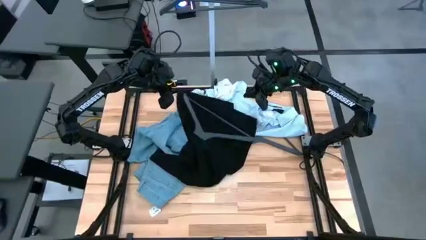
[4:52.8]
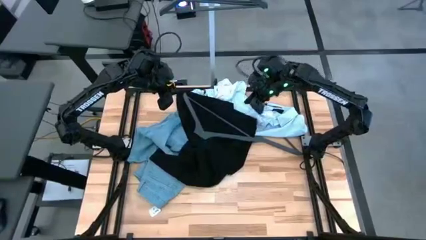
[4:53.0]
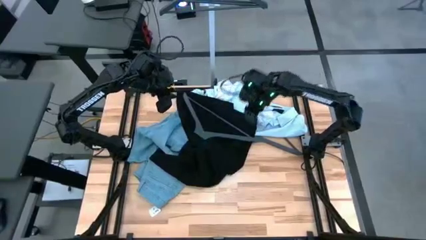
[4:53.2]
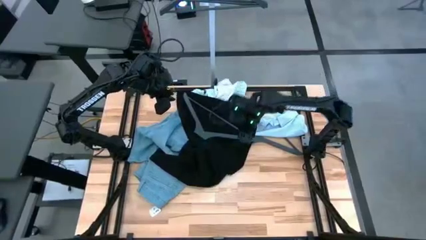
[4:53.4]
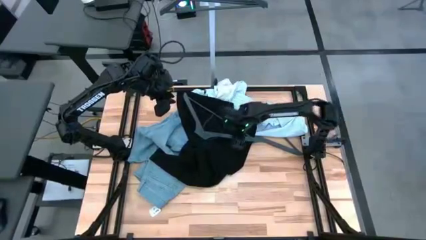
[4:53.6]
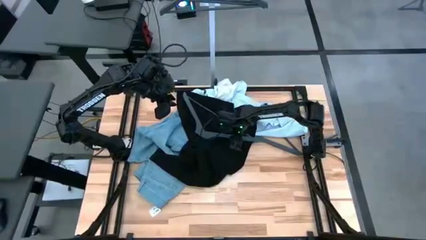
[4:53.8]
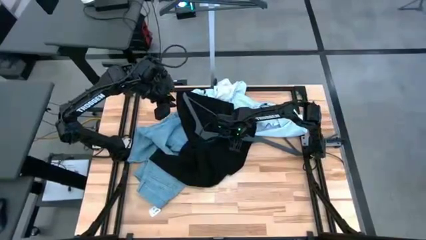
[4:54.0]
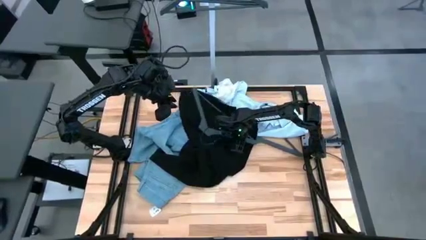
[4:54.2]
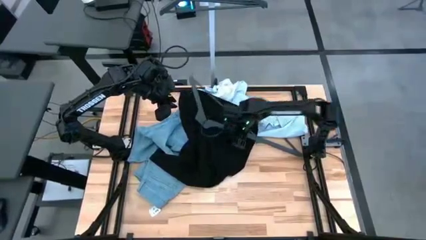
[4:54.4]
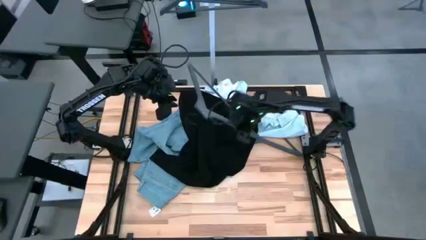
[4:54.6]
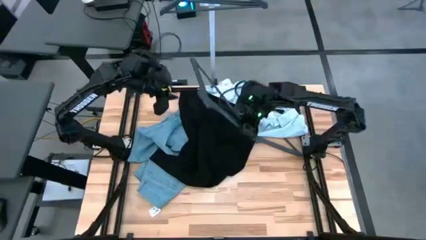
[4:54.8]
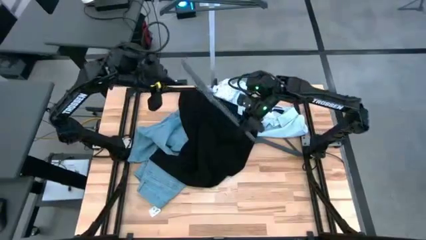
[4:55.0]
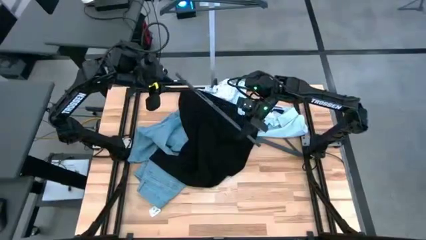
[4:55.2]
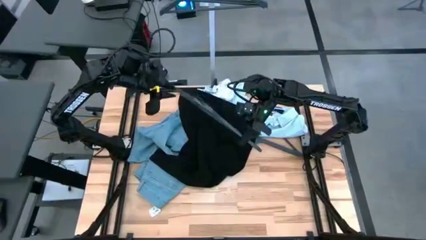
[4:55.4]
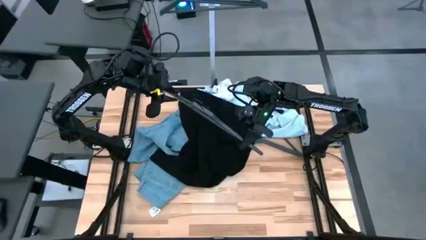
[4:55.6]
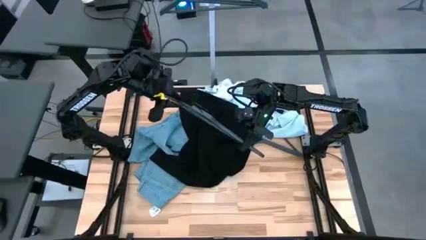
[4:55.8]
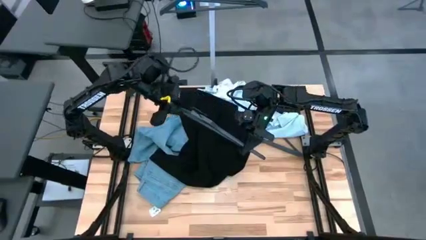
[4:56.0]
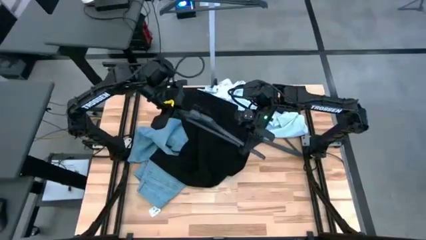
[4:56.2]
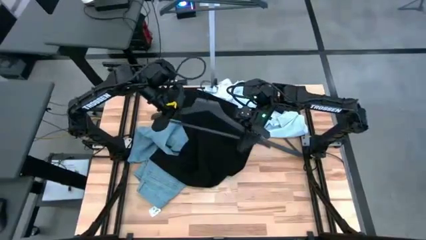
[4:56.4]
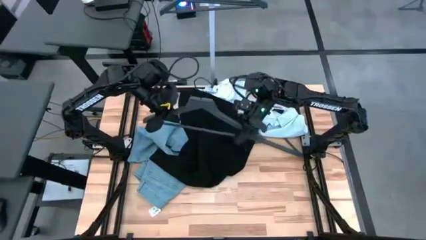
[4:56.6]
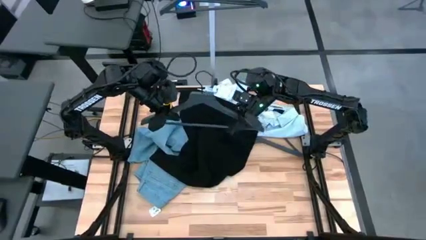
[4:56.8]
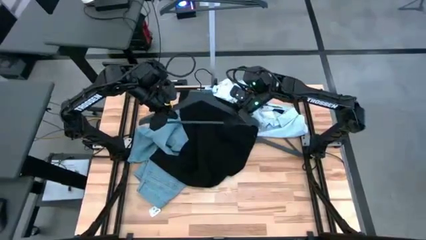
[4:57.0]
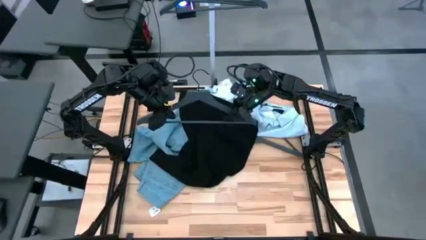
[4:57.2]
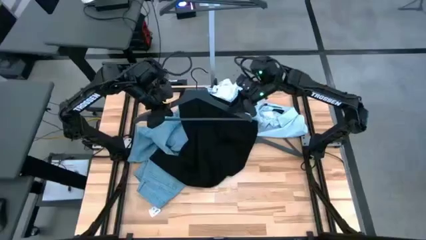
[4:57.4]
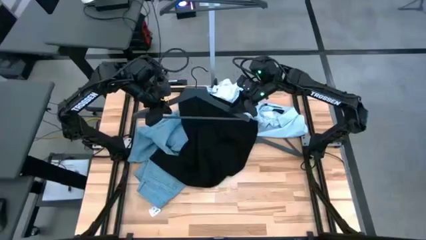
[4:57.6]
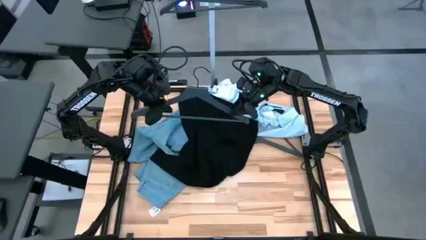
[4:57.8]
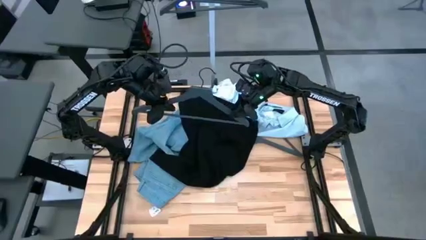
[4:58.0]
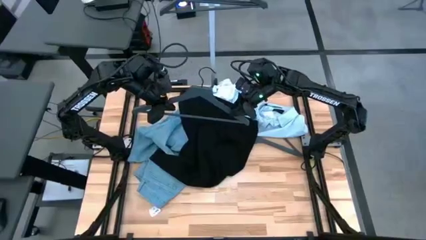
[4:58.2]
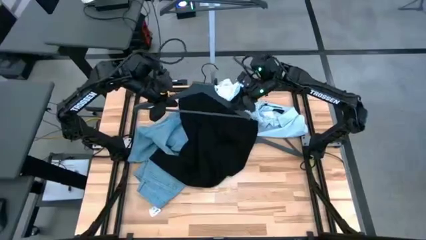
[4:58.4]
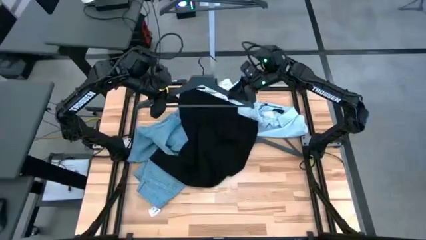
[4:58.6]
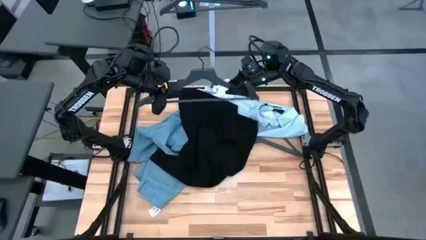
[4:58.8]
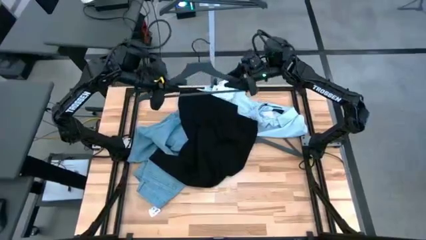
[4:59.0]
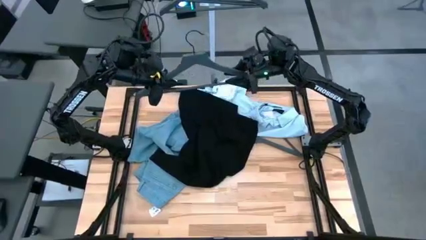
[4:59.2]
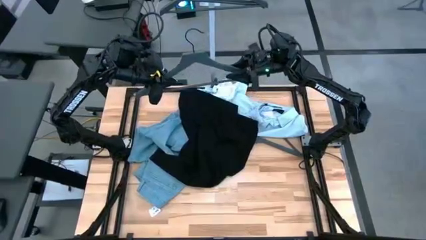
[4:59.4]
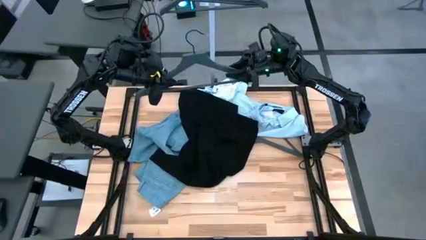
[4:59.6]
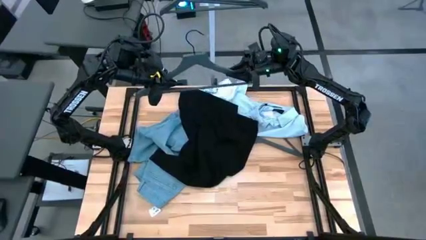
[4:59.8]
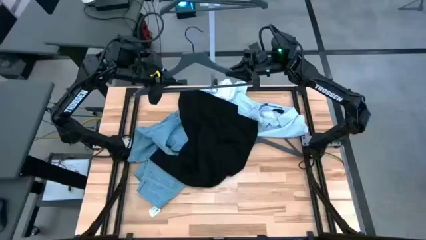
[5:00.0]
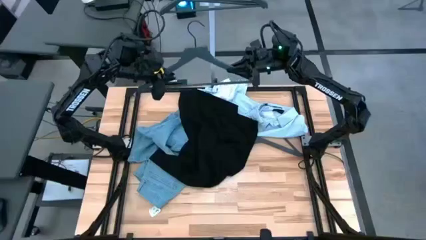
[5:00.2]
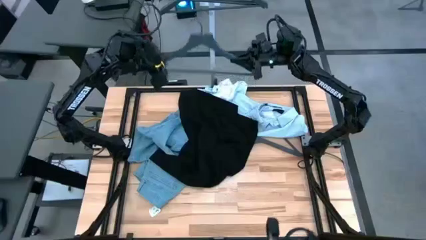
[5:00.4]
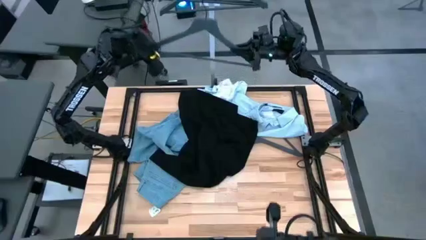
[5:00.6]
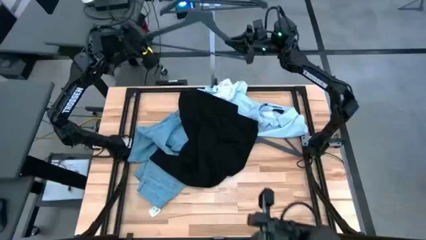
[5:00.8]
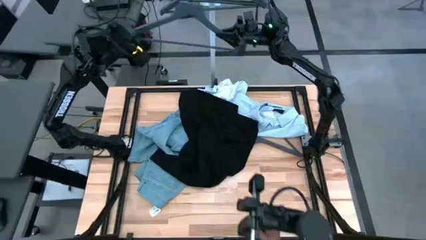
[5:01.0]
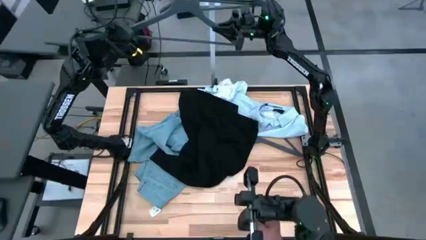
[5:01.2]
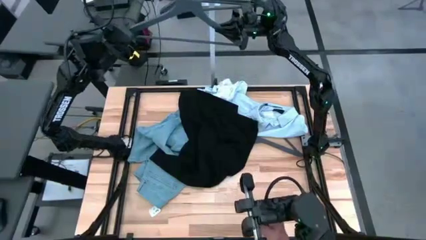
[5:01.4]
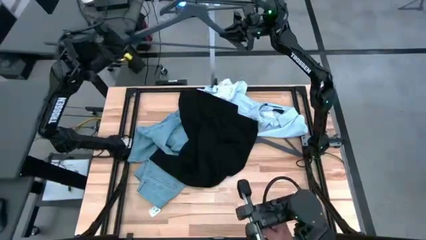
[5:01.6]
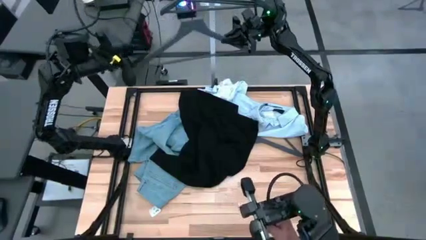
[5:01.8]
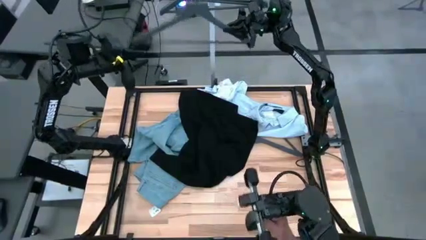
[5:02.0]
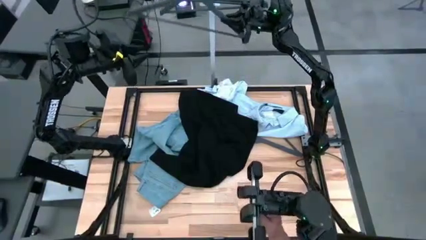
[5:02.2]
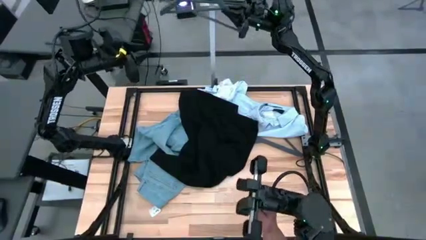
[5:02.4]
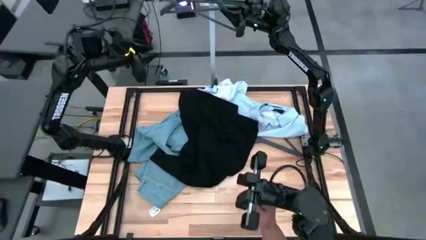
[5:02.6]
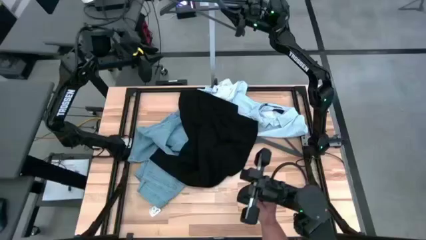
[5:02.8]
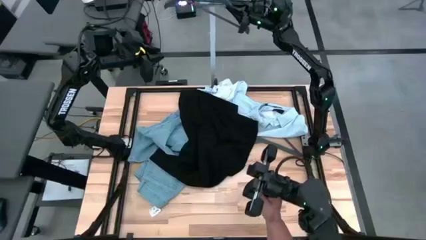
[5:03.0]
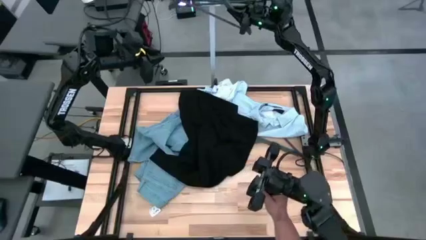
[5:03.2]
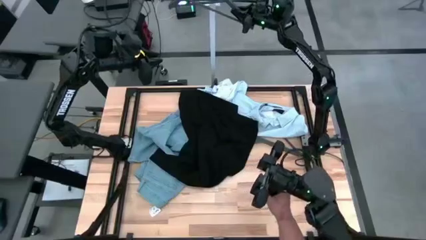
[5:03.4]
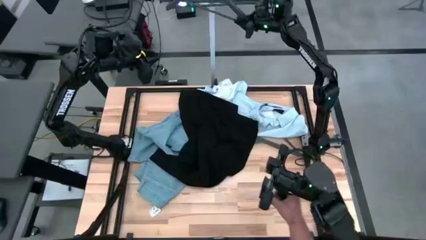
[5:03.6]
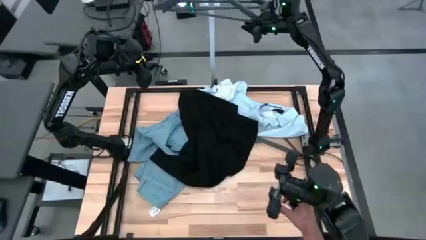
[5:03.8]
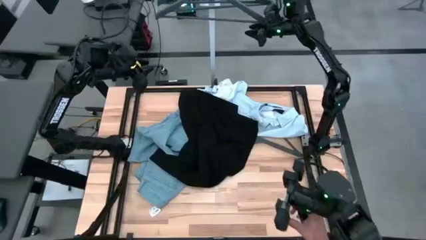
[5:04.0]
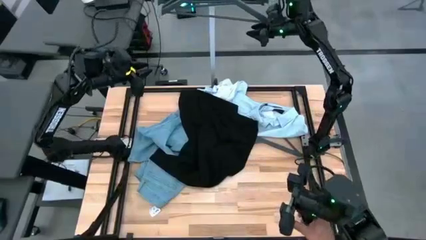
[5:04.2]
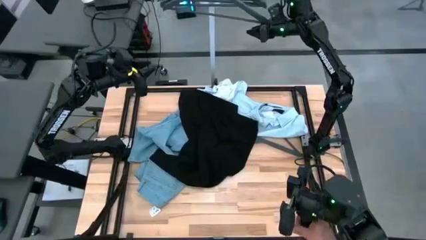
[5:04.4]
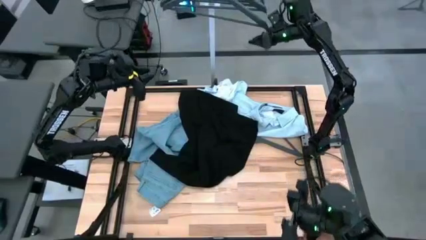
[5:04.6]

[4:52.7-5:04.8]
Task: Hang clothes
Hang the grey hanger on the rack

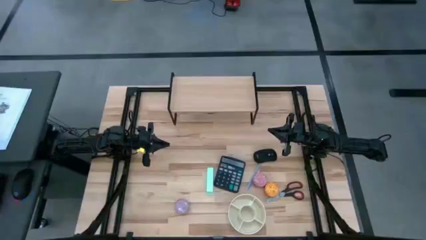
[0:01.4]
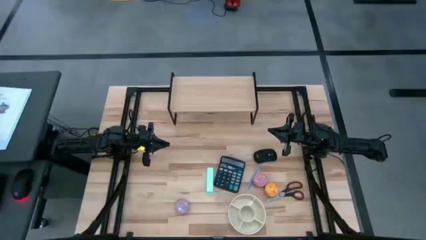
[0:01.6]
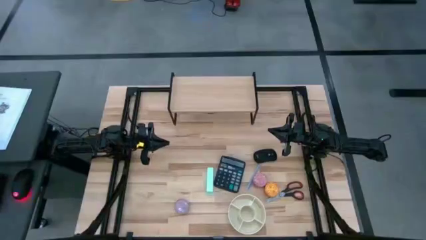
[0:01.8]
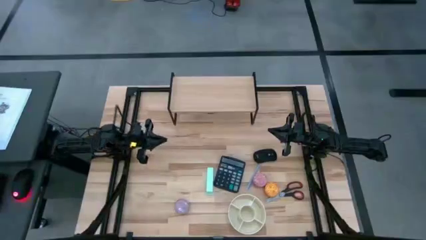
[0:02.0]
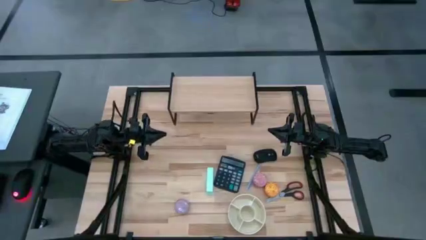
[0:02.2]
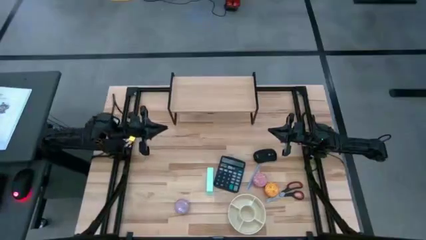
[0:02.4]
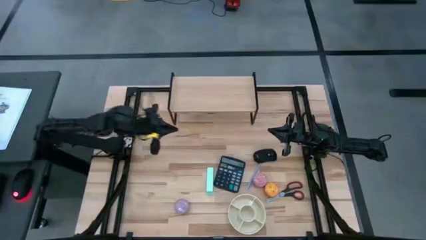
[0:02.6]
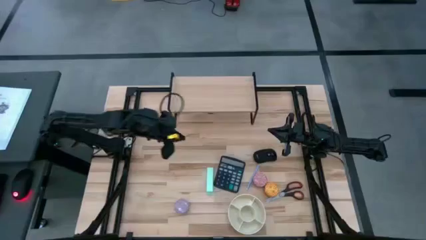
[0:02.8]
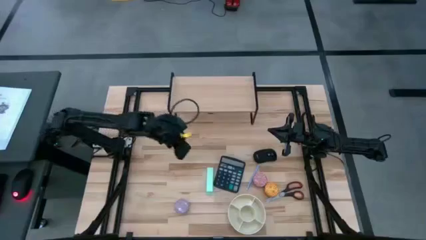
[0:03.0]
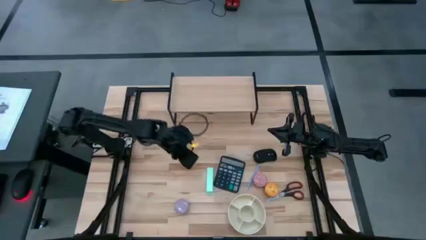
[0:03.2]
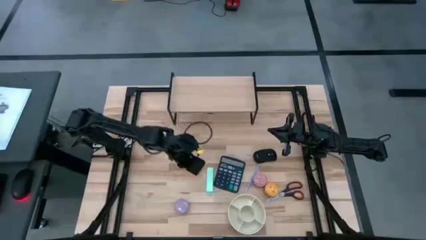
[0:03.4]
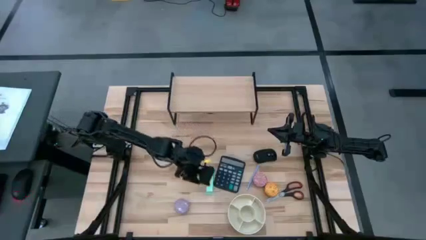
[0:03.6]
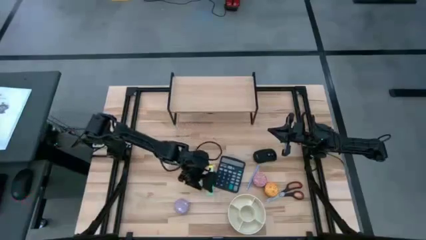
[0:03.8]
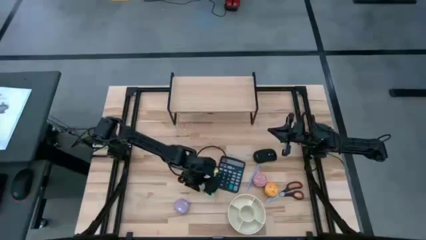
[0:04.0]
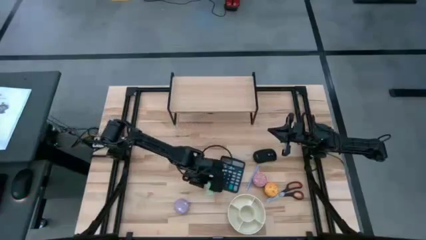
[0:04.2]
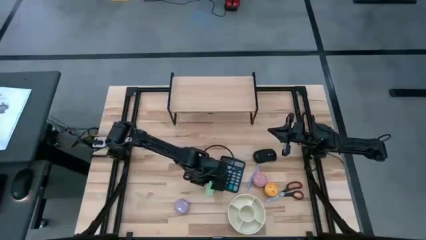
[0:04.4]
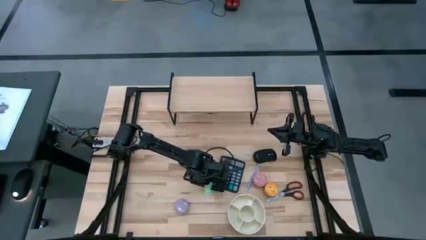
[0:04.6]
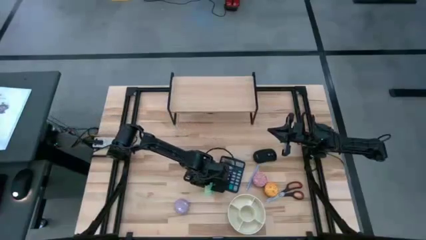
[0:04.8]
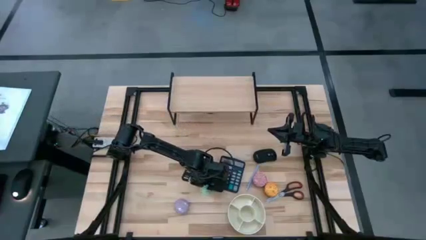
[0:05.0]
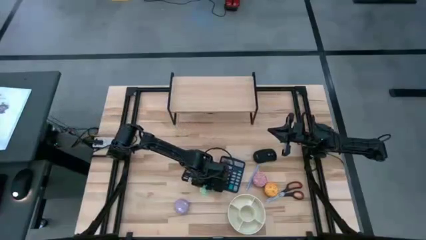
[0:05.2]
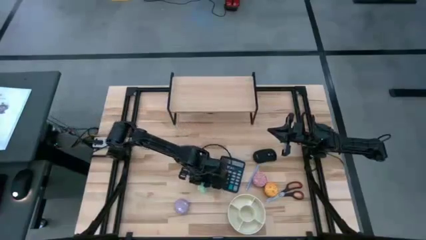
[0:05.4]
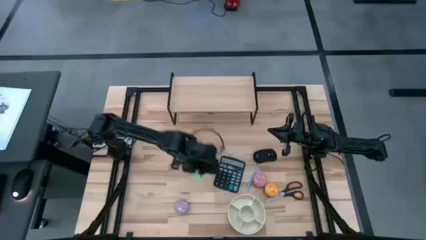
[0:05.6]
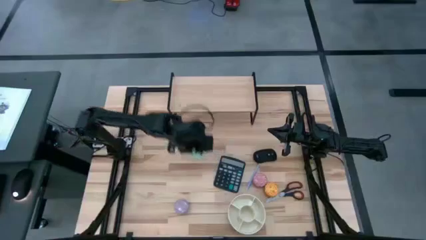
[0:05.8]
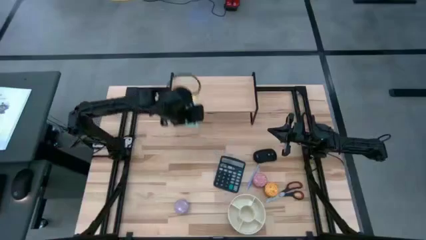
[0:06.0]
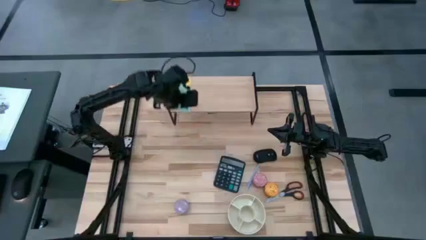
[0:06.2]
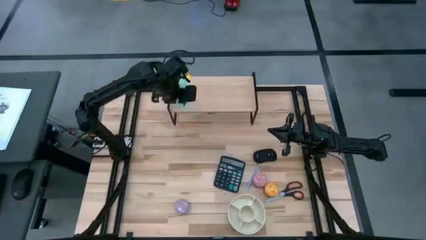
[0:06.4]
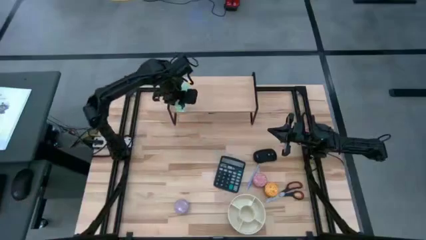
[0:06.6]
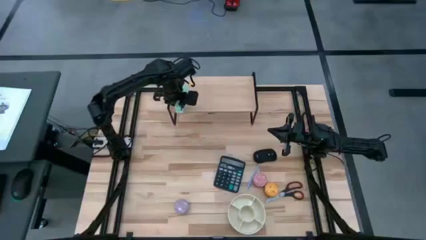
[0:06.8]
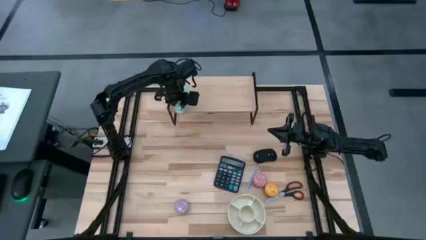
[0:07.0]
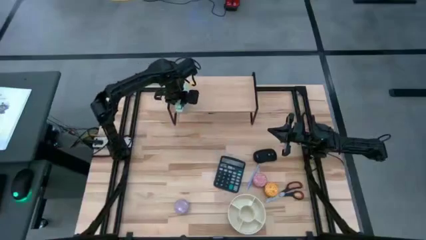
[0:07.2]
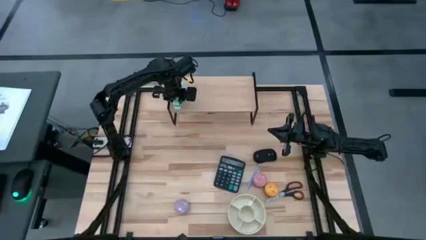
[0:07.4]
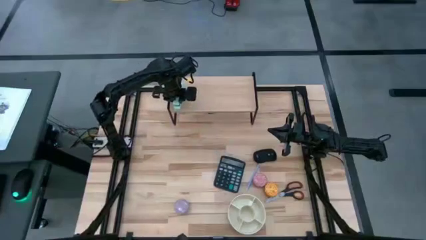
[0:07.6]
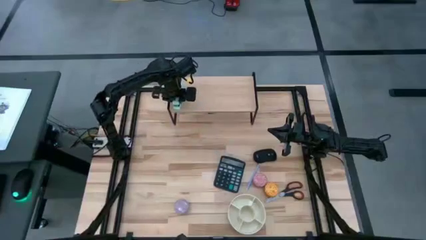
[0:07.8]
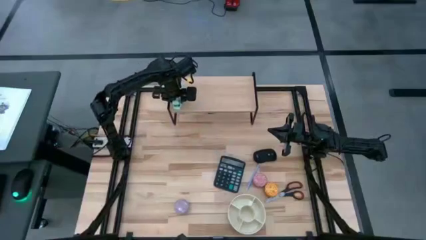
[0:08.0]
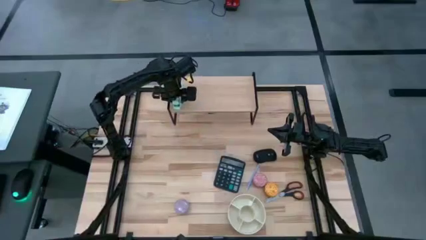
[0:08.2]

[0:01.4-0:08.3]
Task: Stock shelves
Put the light blue stapler on the shelf
